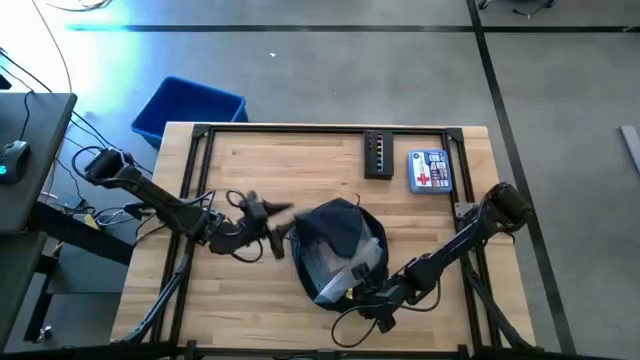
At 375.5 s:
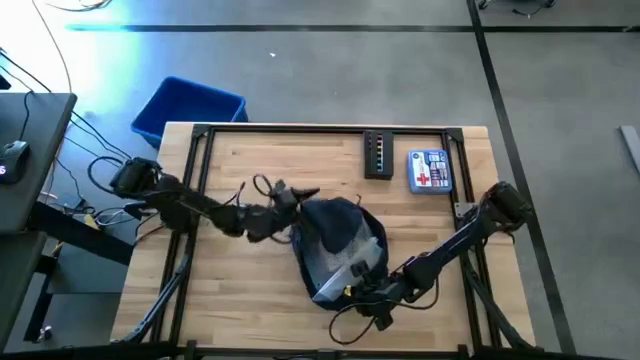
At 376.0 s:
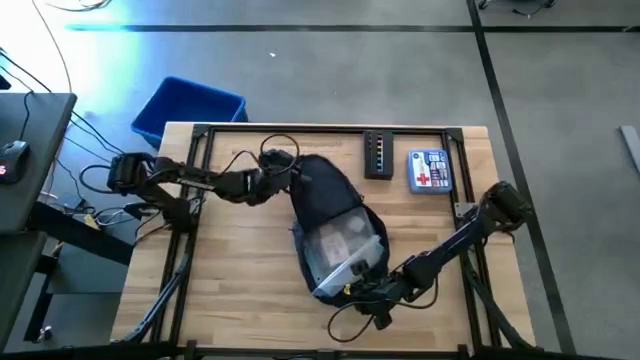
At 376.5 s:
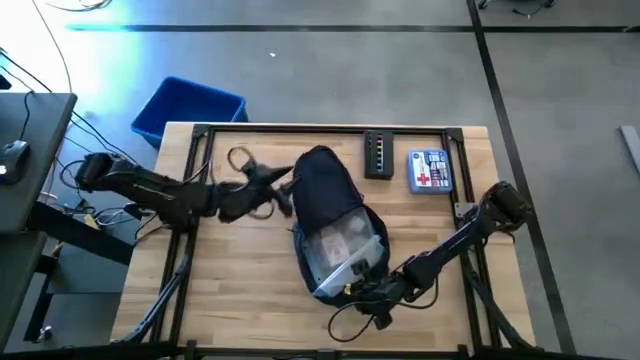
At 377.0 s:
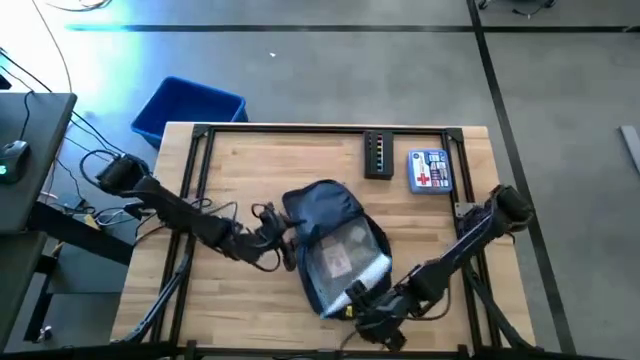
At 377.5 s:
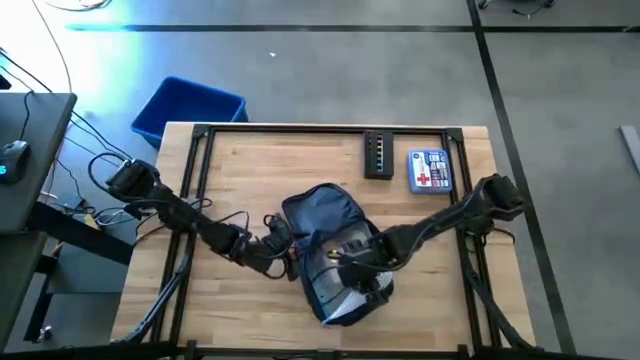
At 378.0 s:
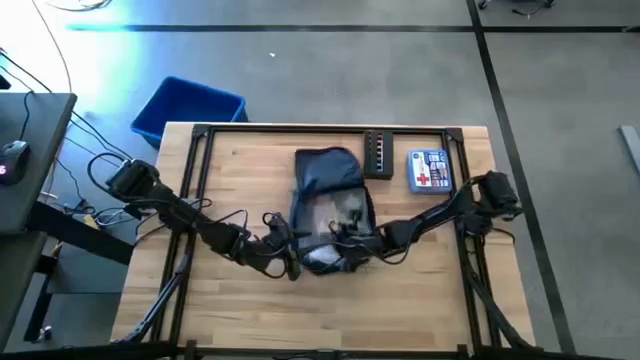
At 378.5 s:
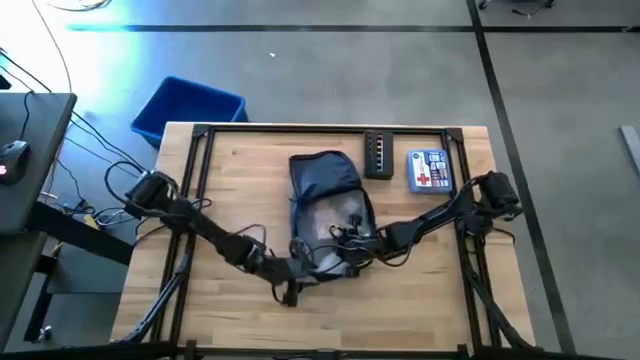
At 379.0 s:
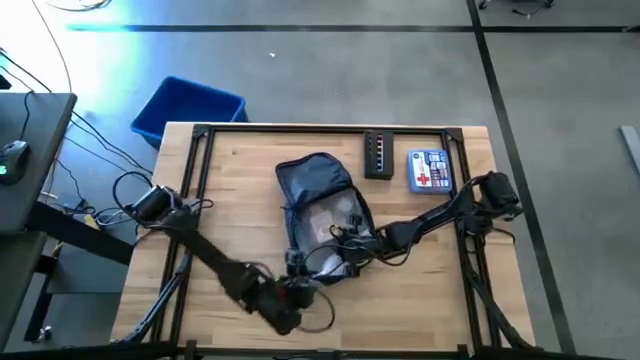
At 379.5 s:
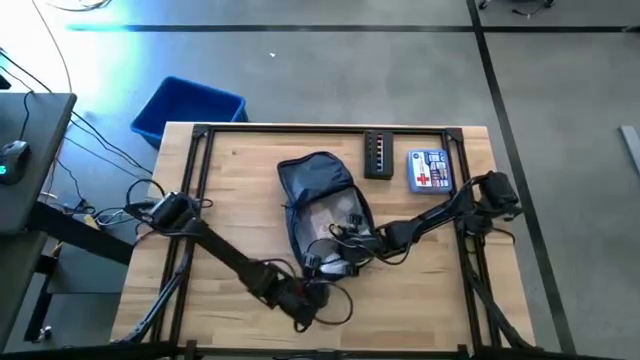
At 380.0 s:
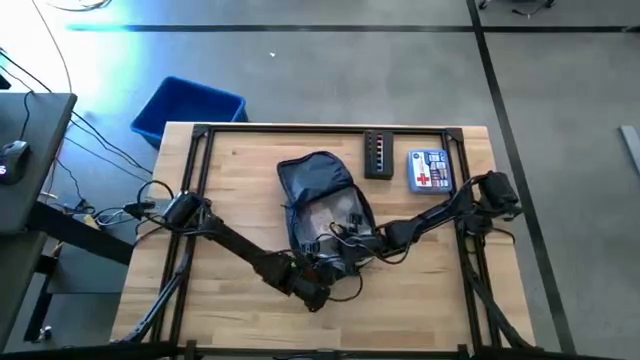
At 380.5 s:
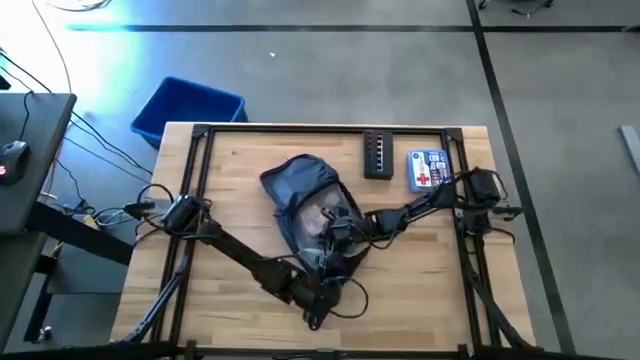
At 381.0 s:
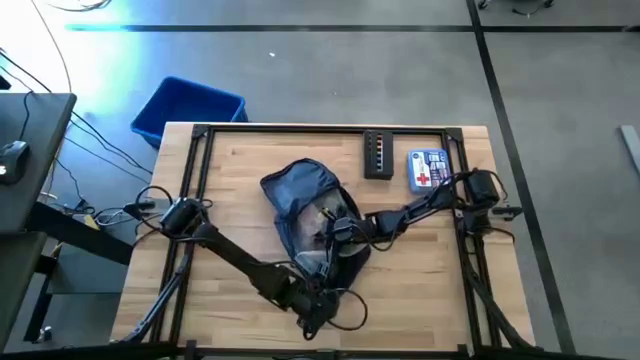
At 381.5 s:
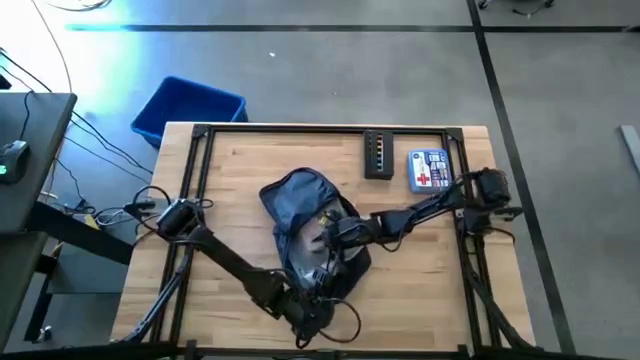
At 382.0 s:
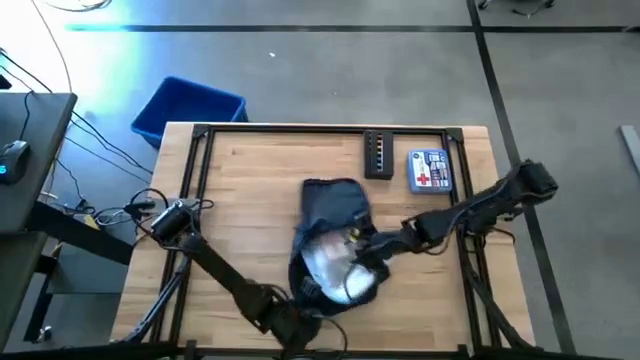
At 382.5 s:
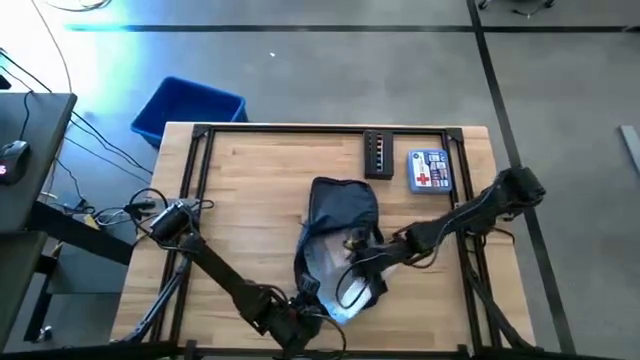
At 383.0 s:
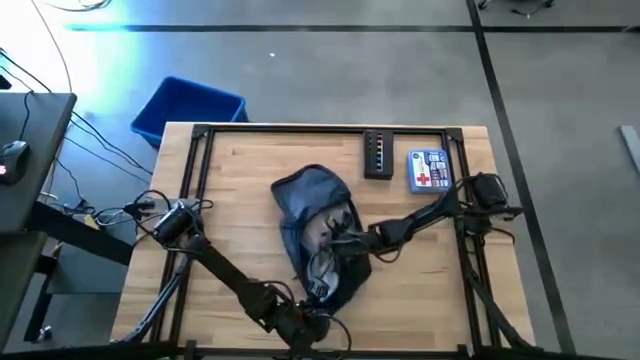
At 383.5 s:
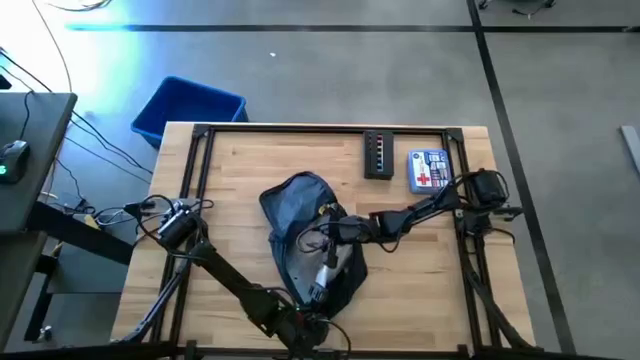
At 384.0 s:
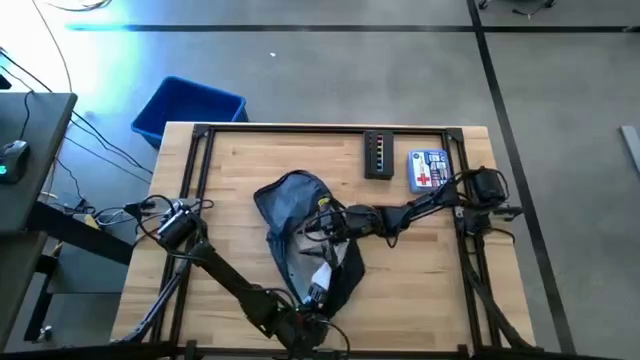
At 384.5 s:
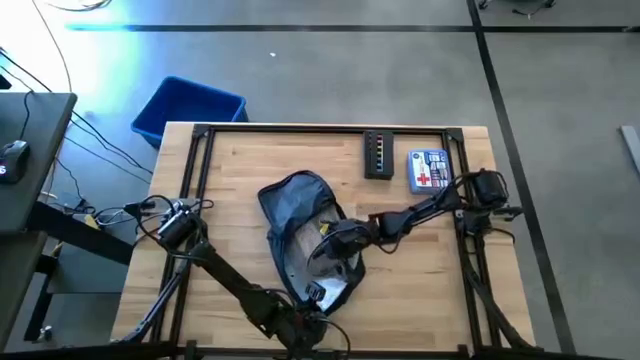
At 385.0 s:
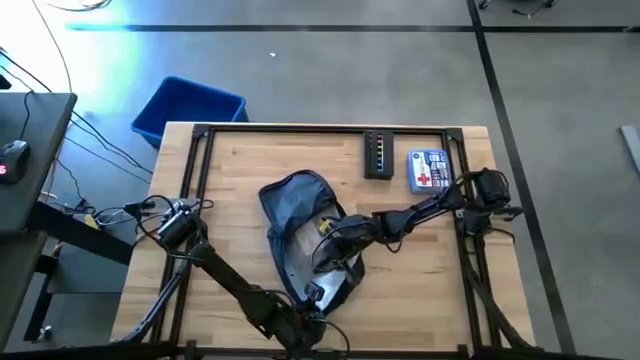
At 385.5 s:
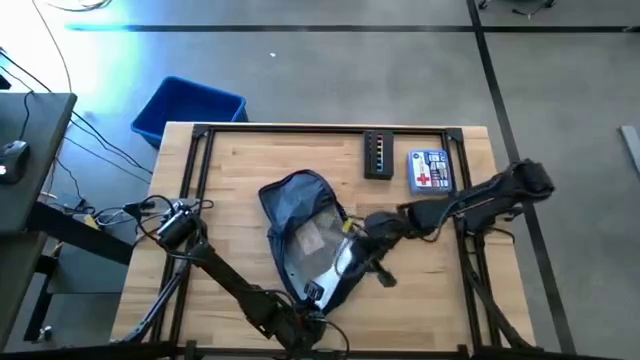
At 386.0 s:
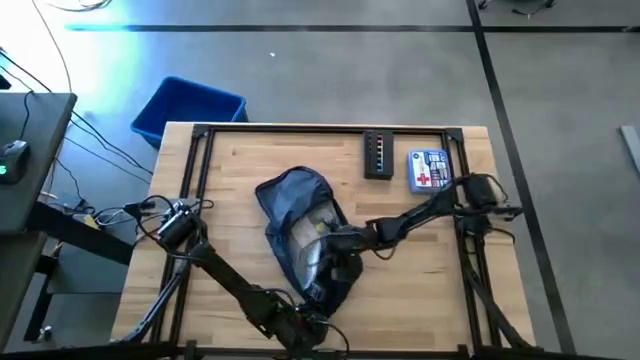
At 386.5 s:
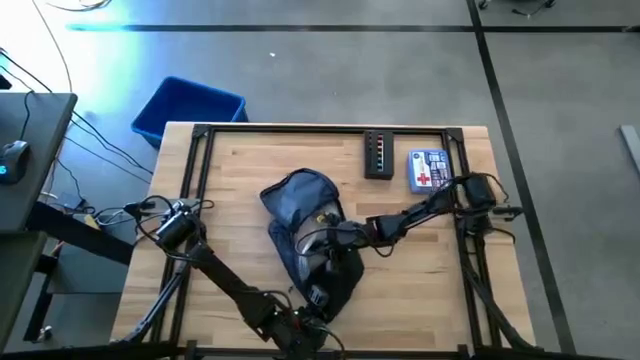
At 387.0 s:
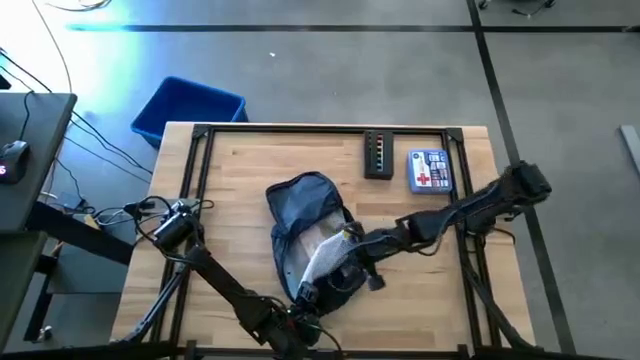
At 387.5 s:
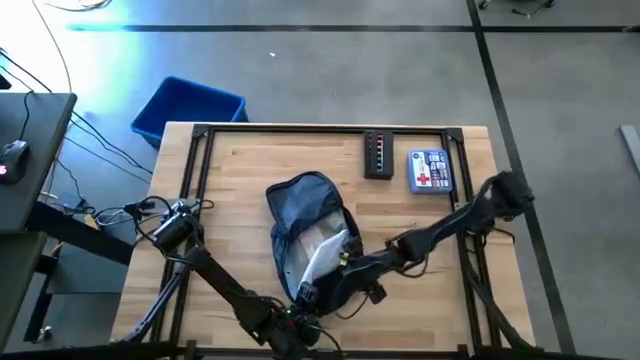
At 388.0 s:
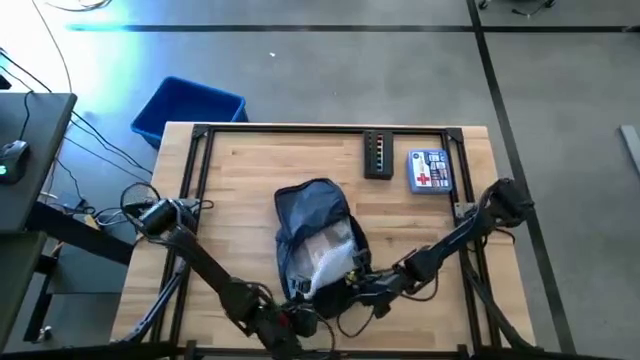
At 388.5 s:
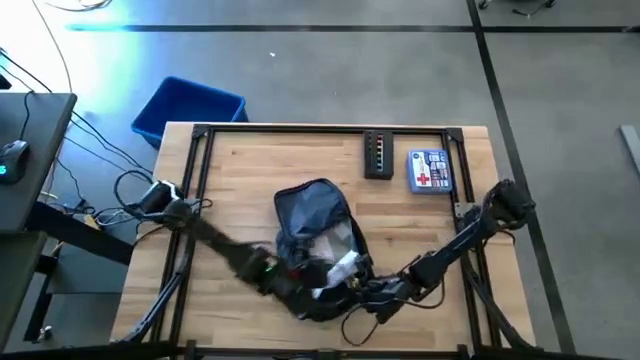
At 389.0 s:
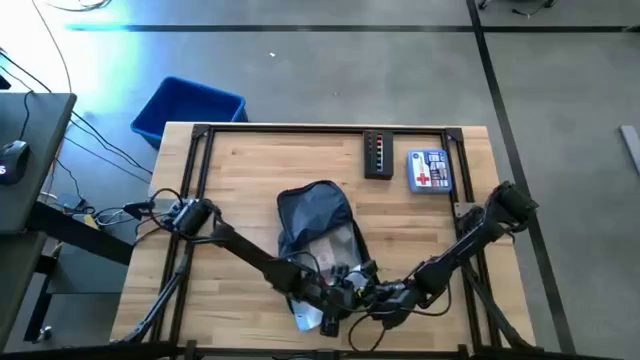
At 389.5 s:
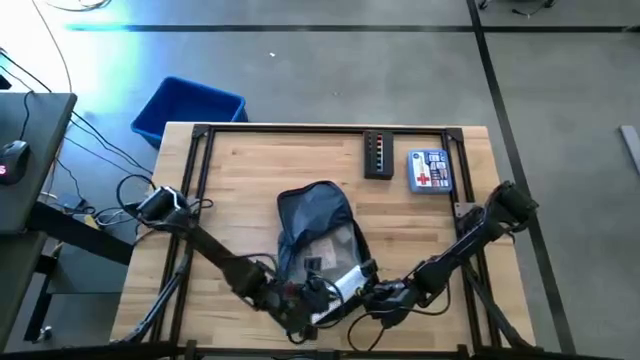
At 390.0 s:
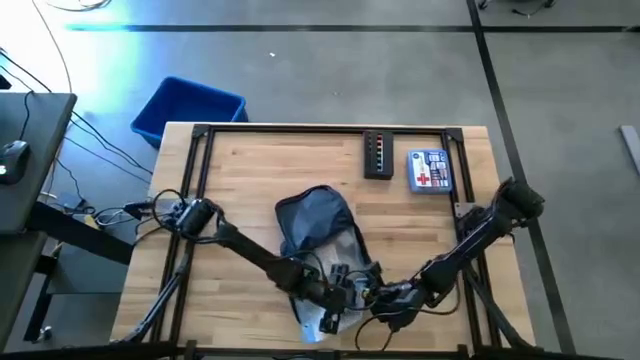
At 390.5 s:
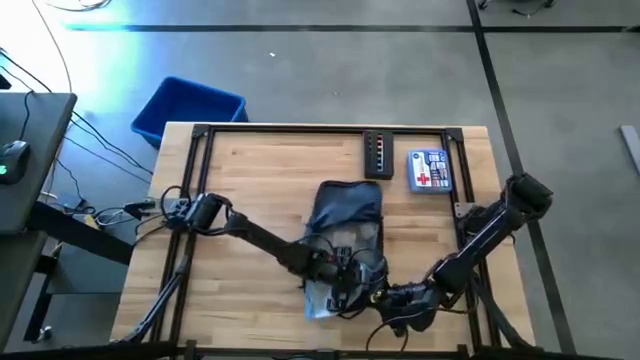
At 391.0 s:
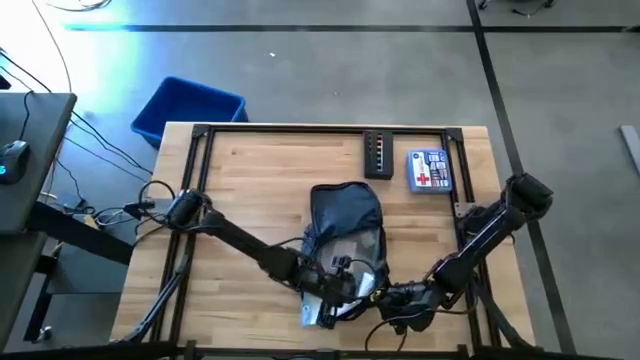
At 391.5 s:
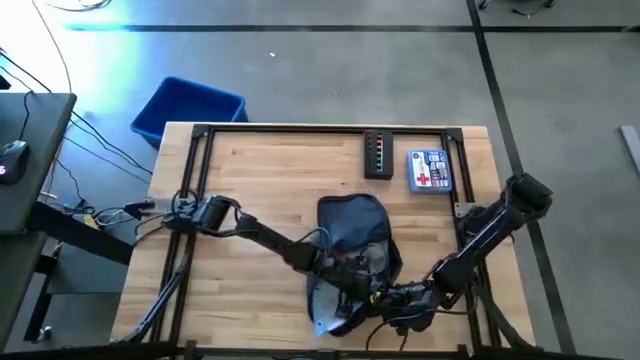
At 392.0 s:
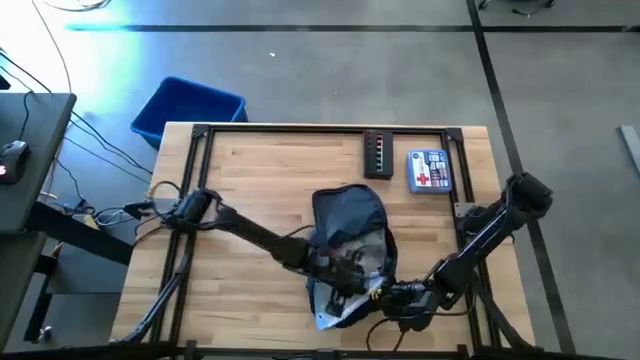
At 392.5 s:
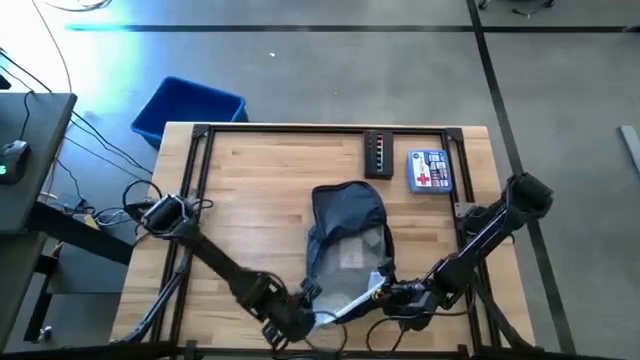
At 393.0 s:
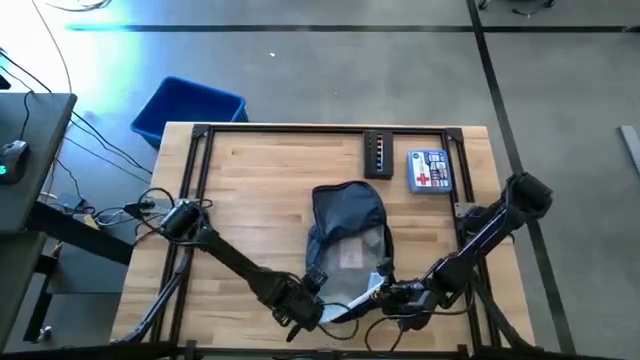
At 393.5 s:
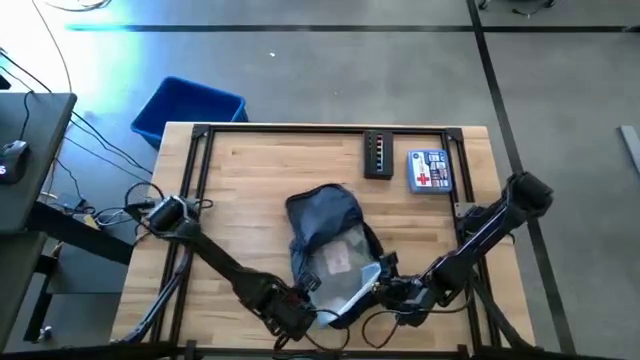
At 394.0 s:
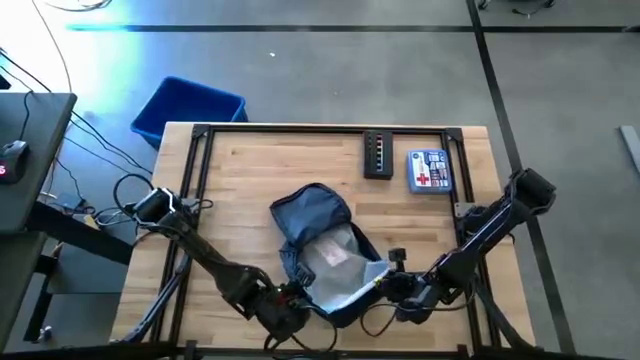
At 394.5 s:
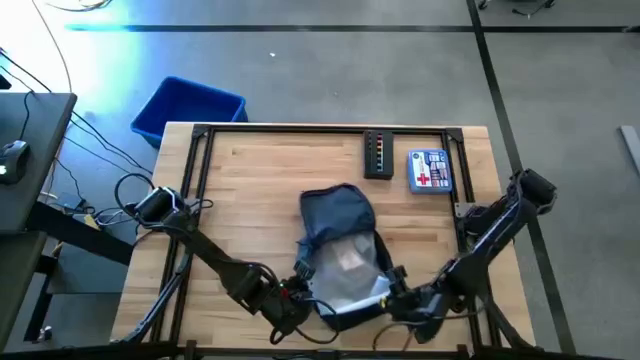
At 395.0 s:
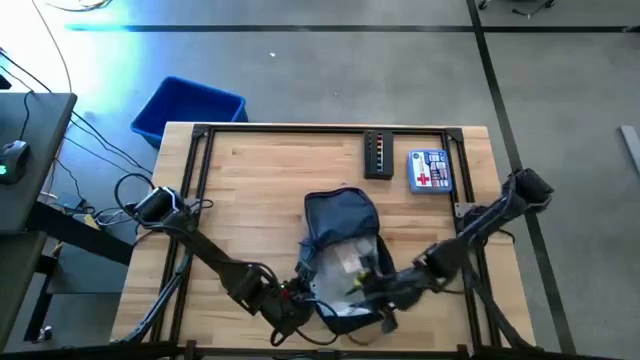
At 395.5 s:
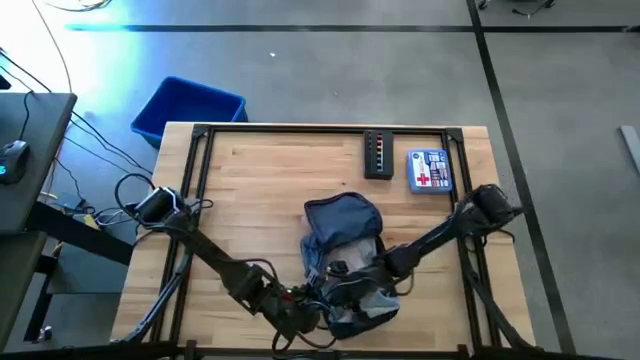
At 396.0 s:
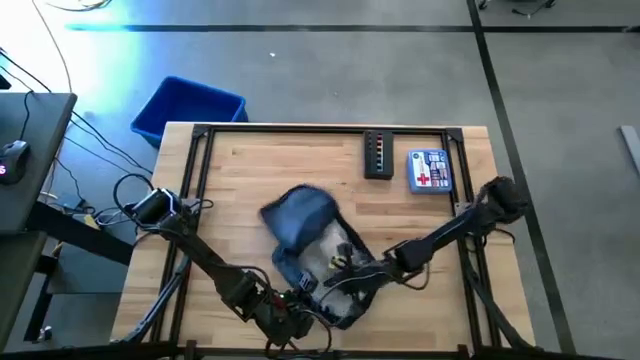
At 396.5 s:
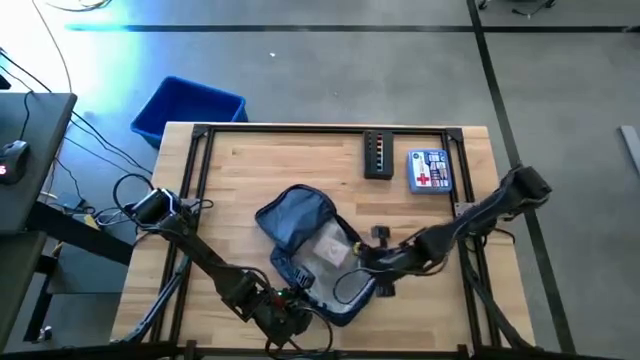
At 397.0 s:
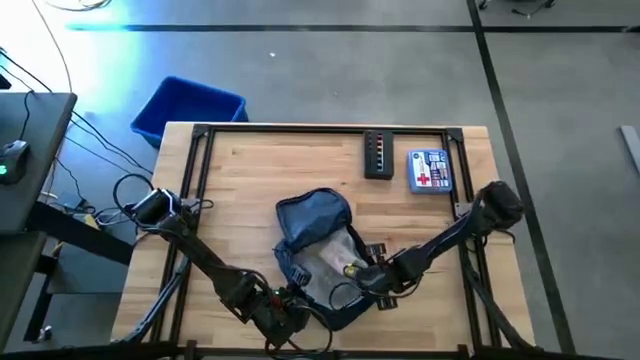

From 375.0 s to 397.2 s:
Task: Unpack backpack
Put the white zip bag into the backpack
